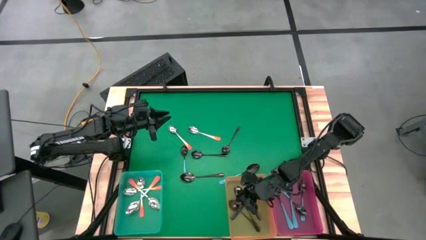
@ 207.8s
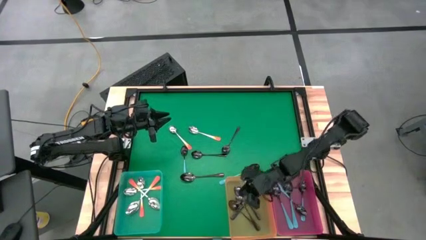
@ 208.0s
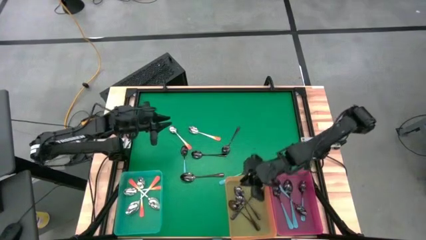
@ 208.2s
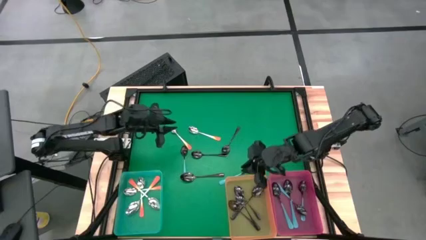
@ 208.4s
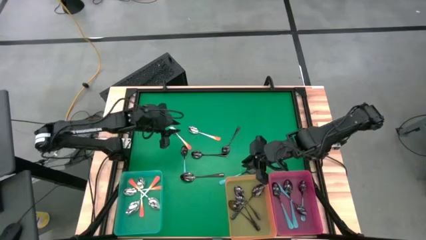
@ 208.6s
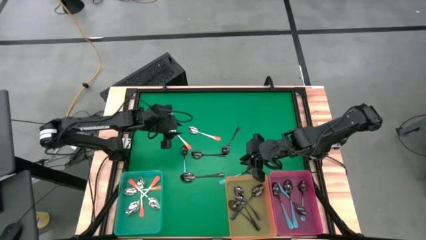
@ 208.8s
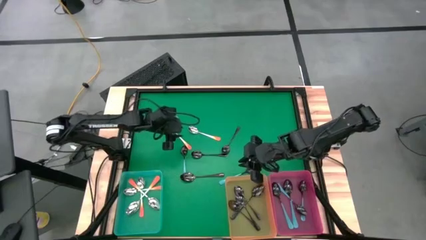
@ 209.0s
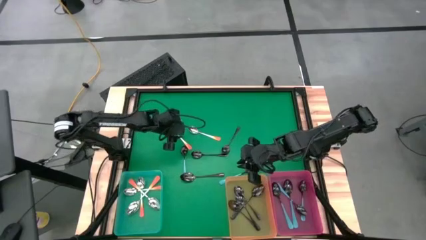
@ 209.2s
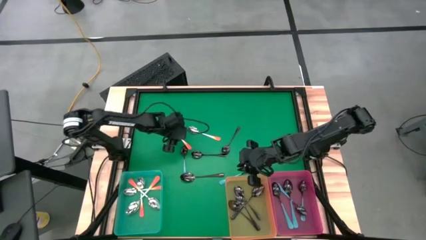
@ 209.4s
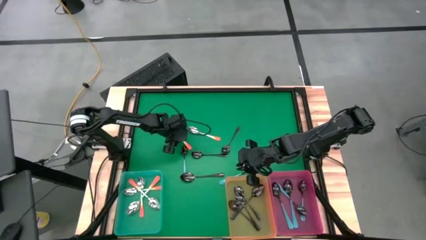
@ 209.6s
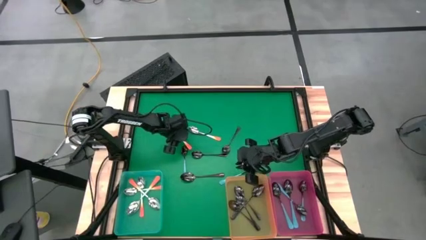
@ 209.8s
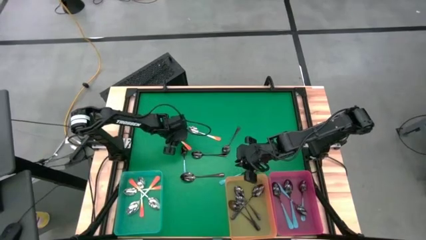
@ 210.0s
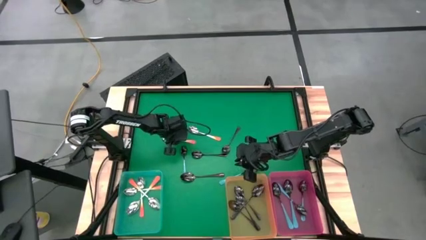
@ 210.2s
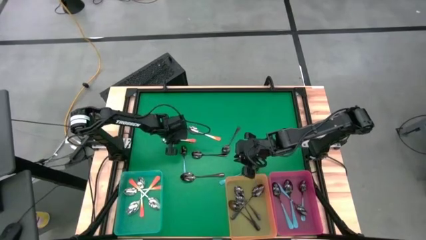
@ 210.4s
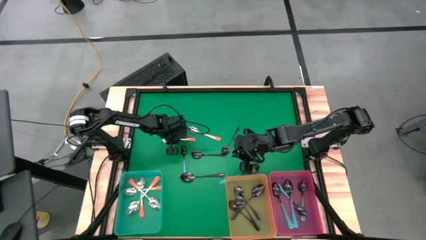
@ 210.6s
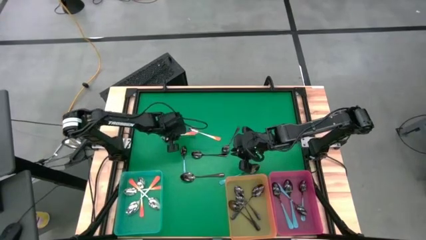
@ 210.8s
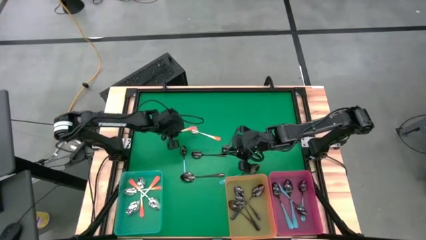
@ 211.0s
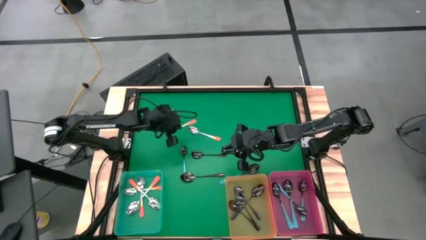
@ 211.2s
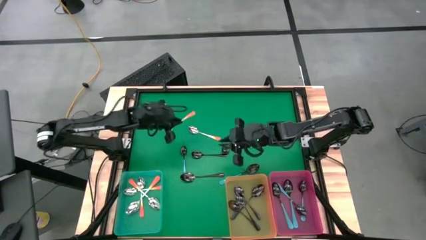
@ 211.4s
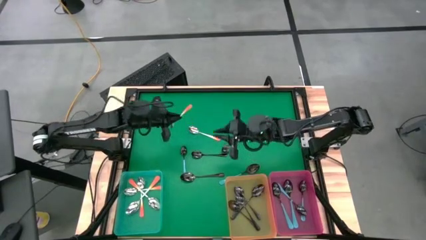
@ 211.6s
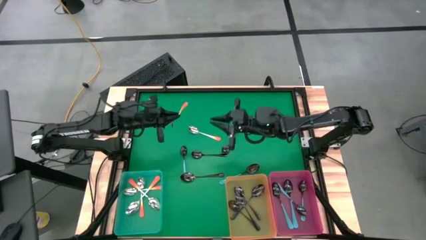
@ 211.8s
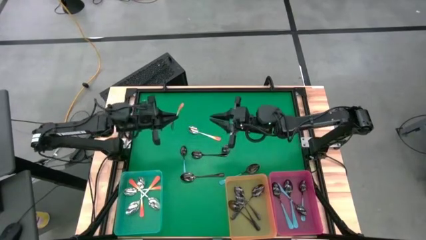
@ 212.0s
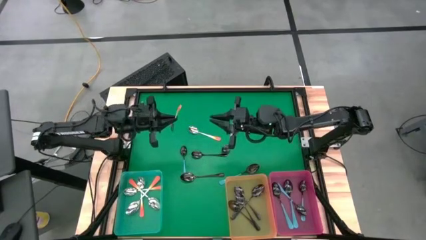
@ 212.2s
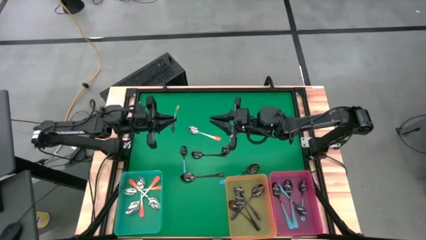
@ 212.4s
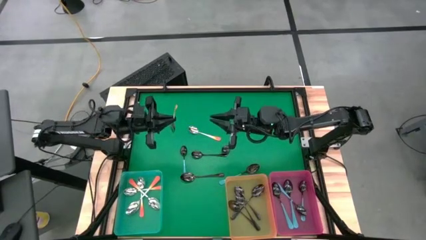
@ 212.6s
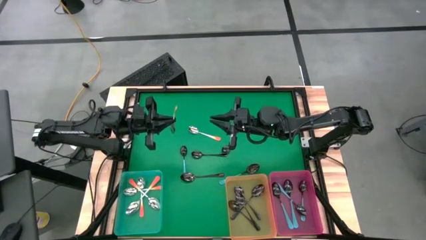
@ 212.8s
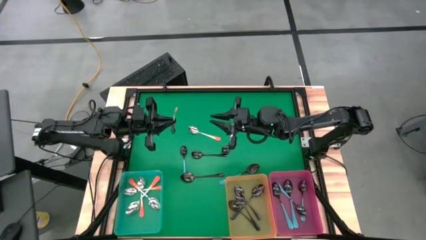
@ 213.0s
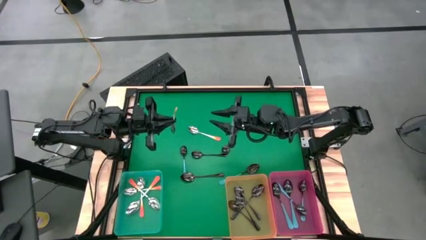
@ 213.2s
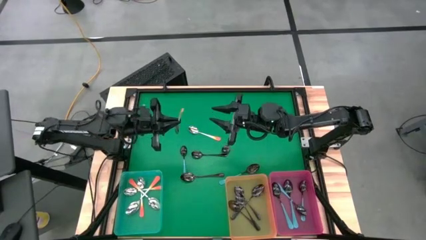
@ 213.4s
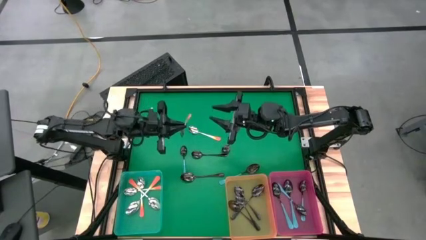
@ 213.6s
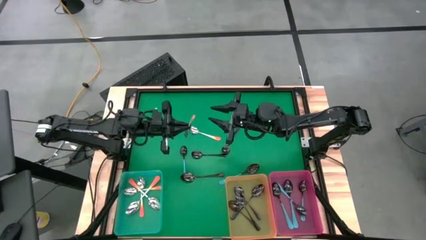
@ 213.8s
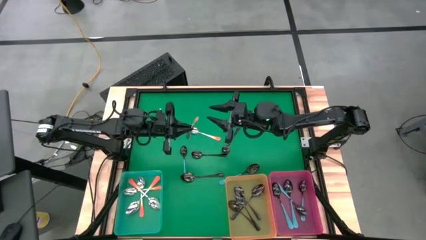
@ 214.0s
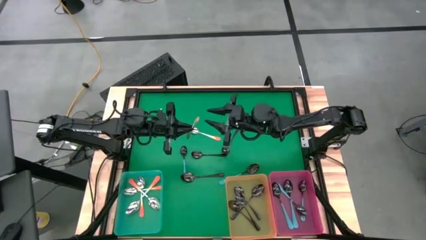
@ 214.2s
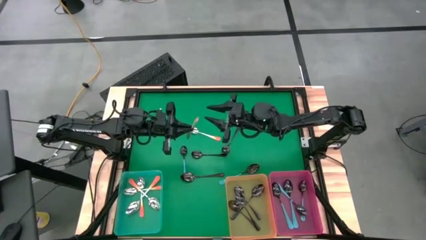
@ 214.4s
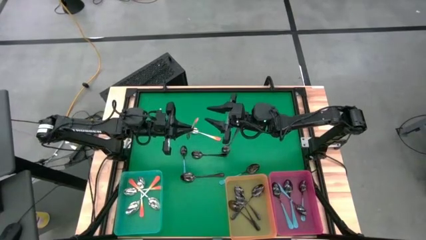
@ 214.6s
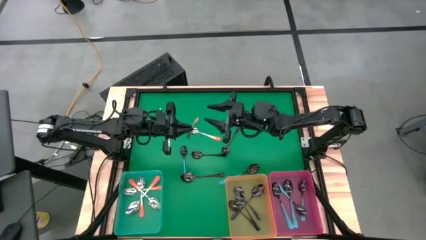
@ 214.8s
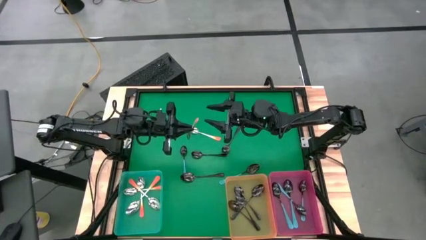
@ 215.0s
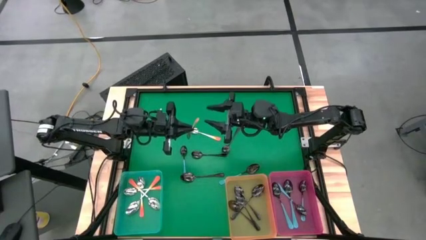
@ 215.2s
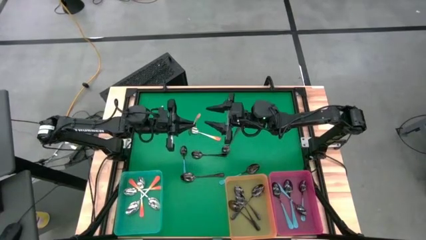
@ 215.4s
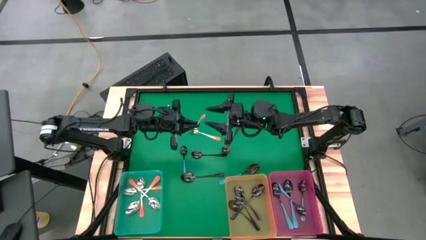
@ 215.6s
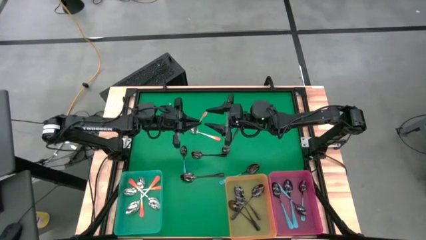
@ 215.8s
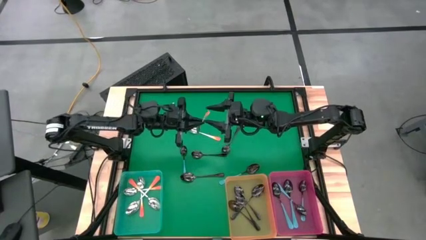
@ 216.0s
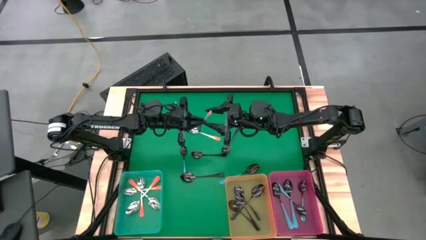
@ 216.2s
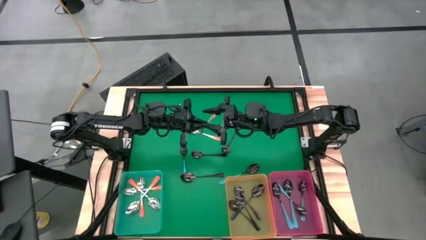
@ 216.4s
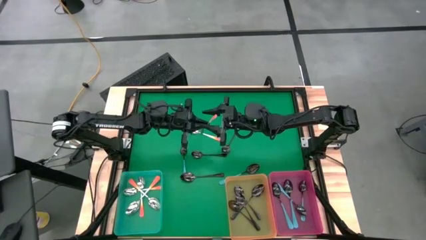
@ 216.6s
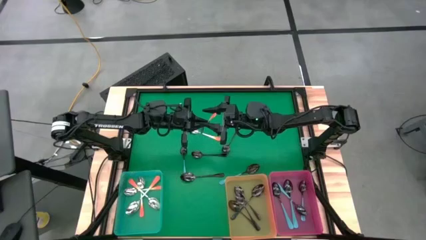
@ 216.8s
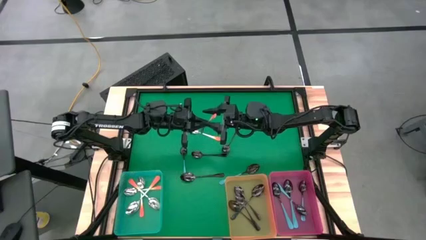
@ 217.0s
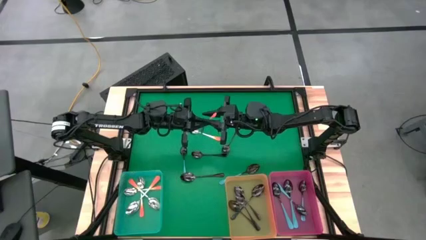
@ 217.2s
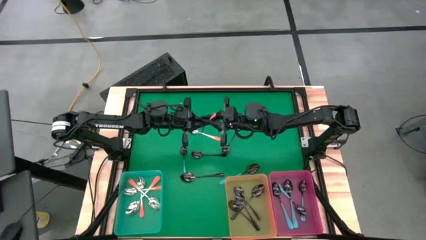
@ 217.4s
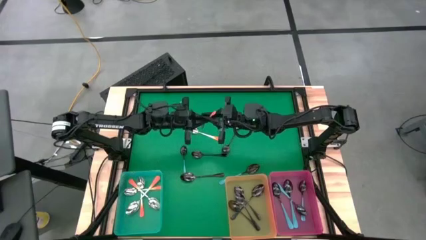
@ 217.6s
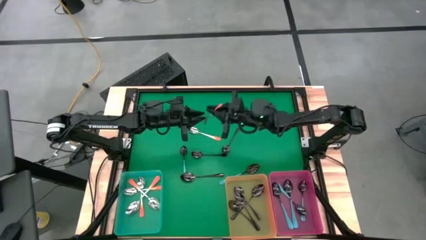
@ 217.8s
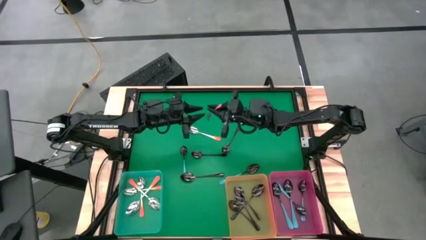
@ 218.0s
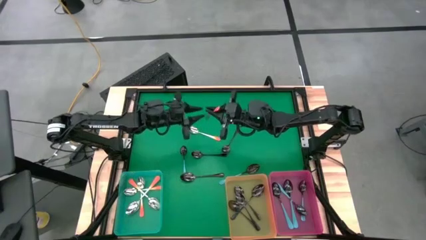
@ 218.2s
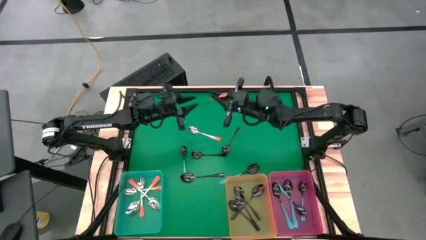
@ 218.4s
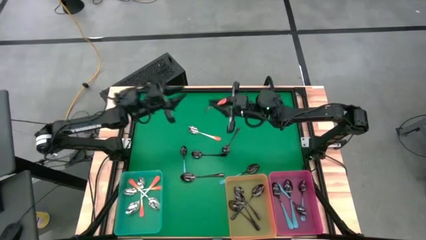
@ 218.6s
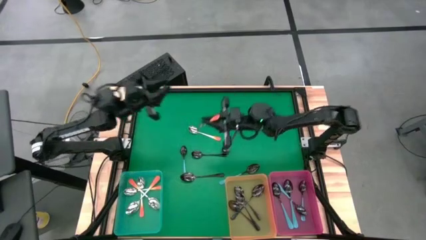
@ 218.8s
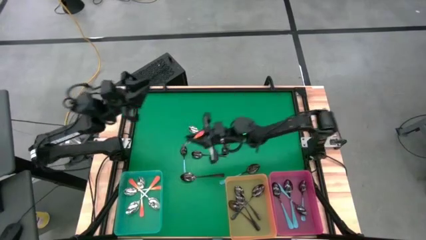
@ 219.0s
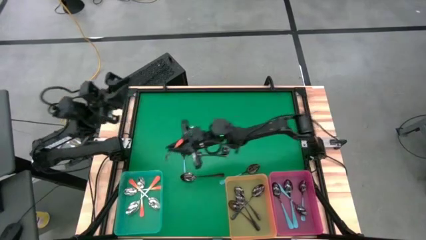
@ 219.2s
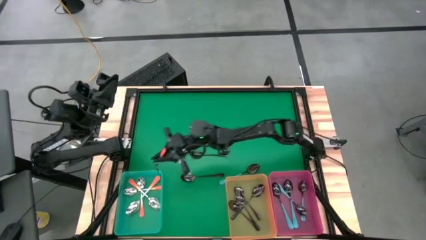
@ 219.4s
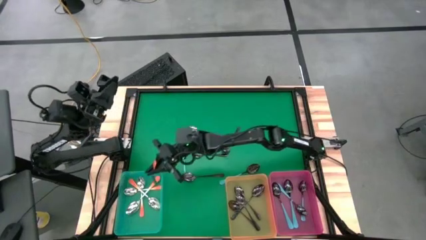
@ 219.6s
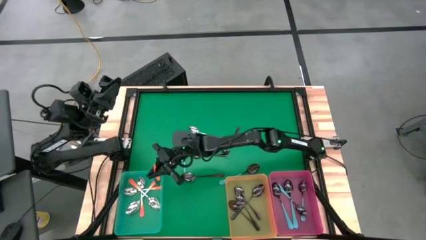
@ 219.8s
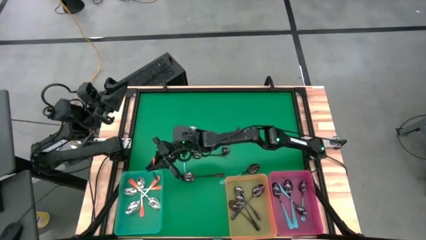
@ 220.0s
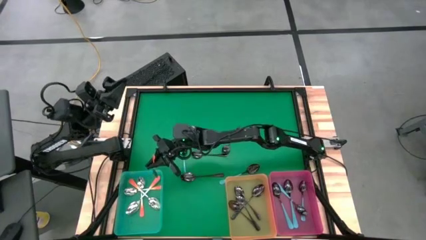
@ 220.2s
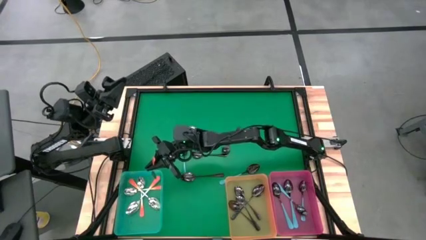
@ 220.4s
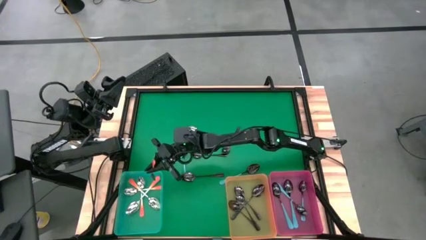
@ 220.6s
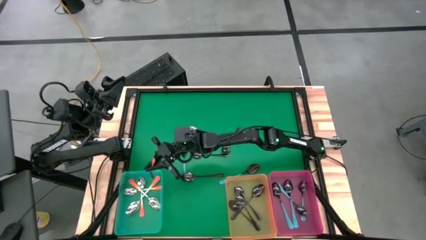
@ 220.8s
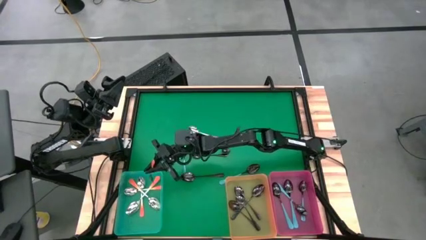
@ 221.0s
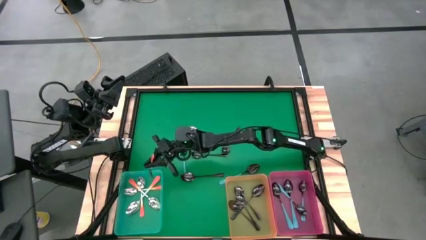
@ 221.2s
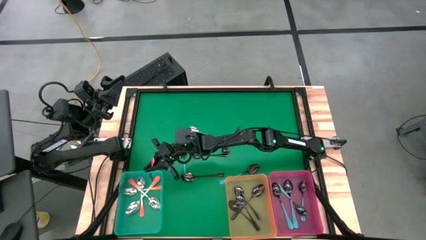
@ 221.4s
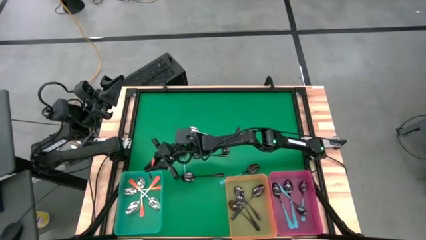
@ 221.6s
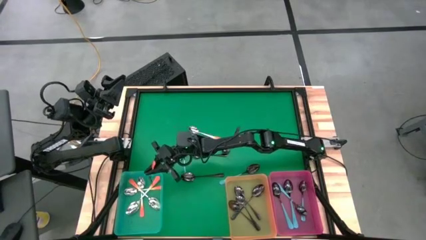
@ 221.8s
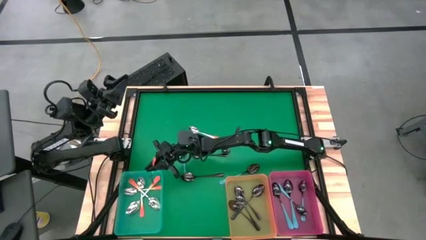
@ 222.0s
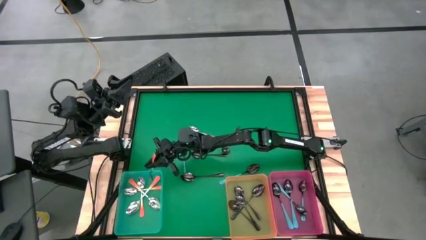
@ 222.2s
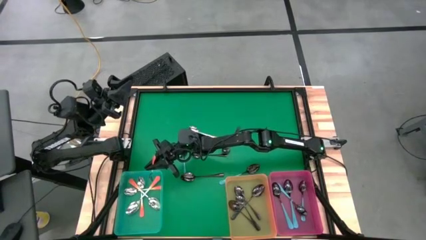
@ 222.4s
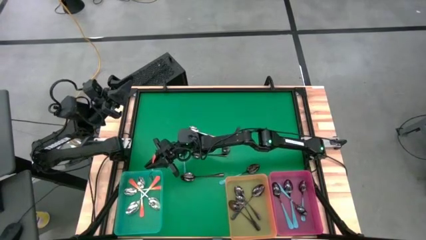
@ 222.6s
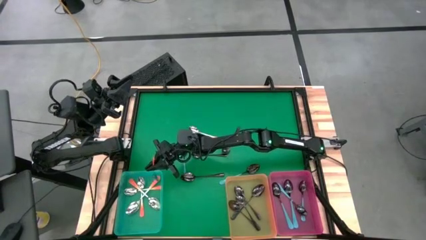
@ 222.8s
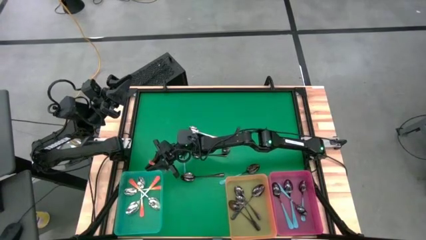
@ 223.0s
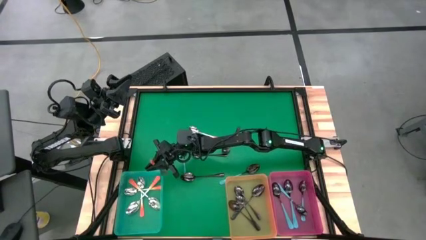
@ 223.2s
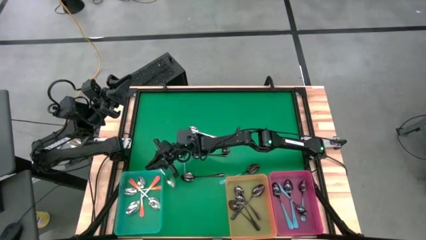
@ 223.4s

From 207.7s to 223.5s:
Task: Sort silverware by color (type)
Put the orange spoon into the green bin
